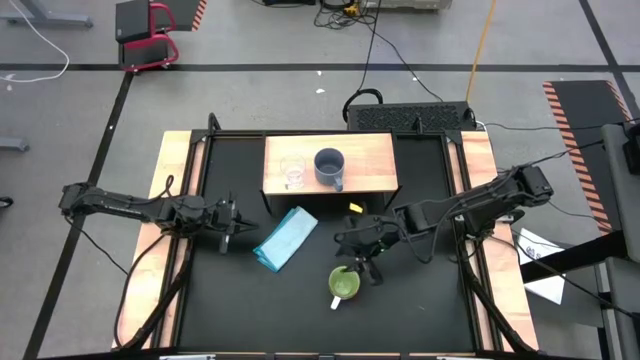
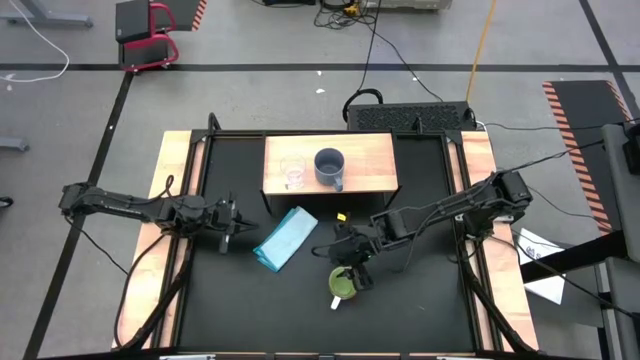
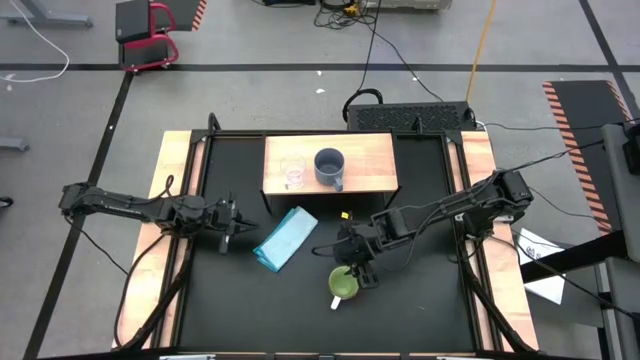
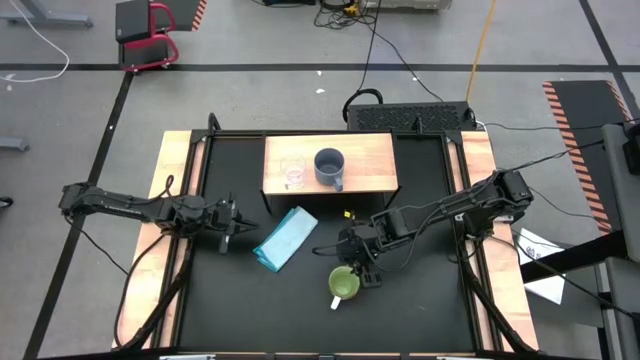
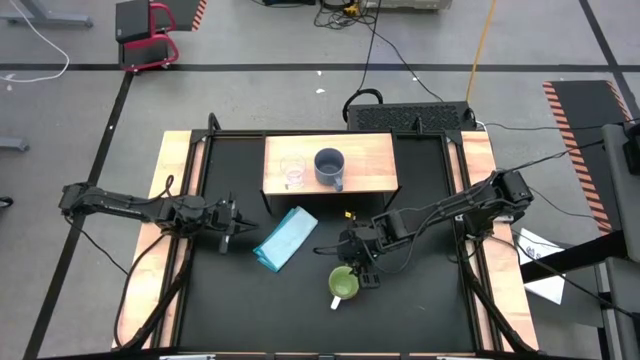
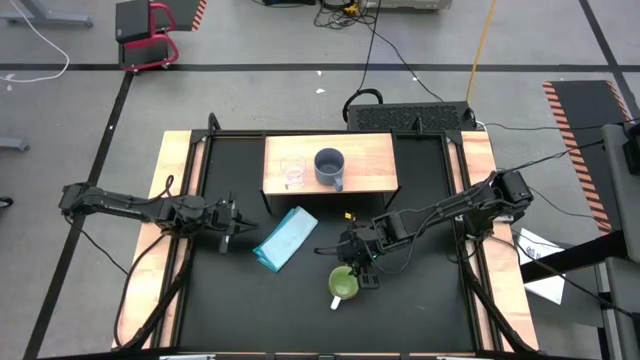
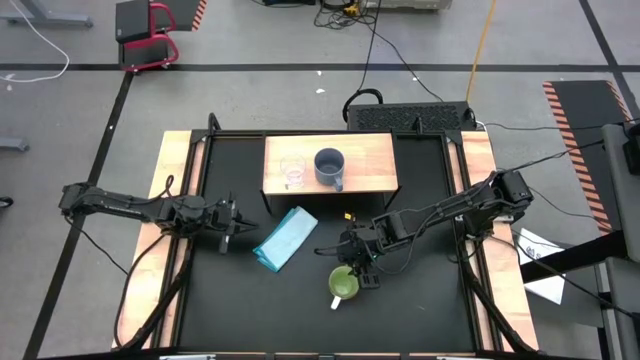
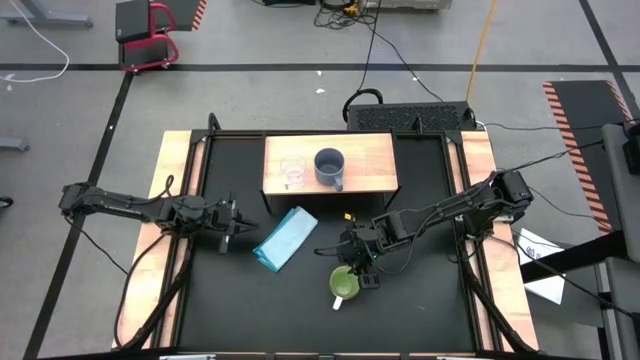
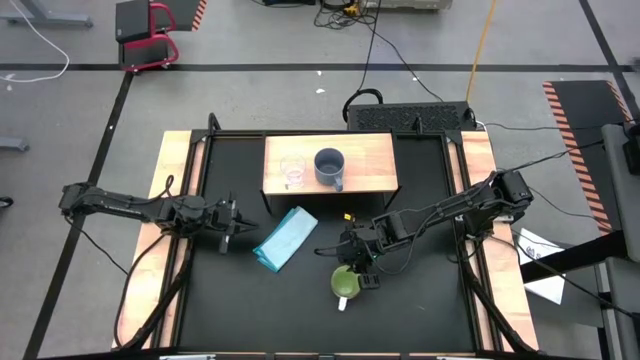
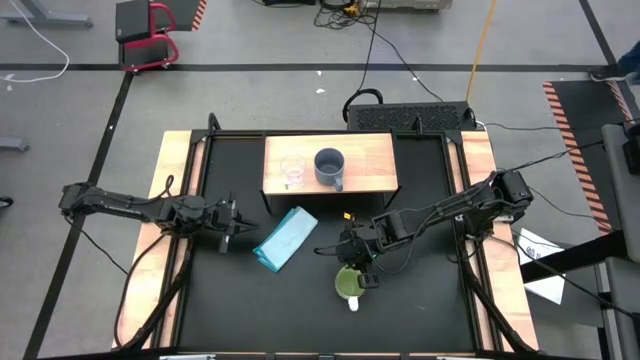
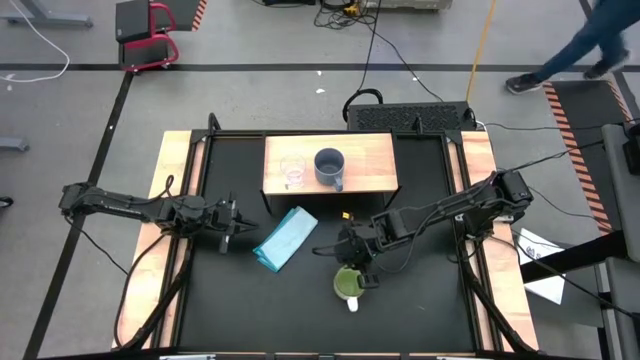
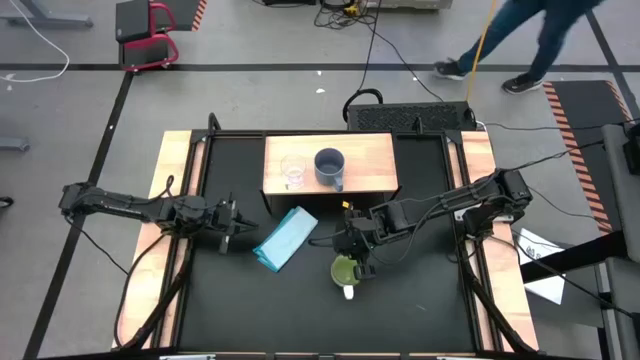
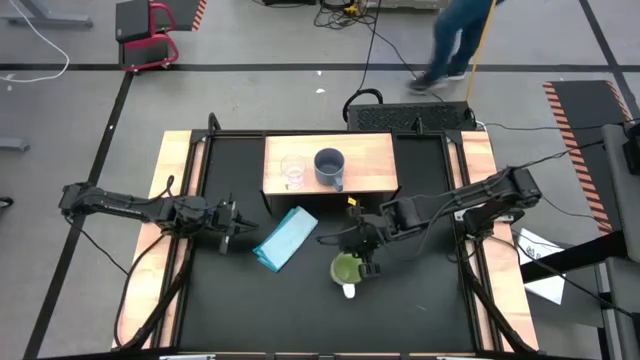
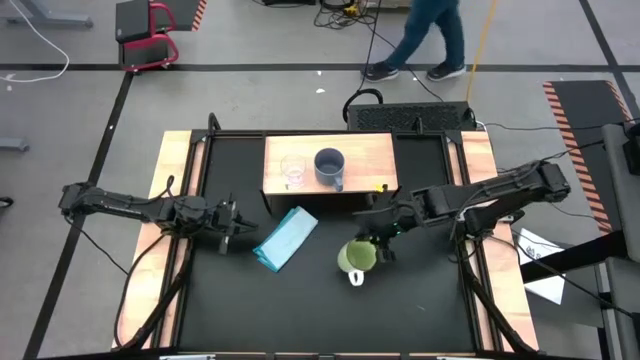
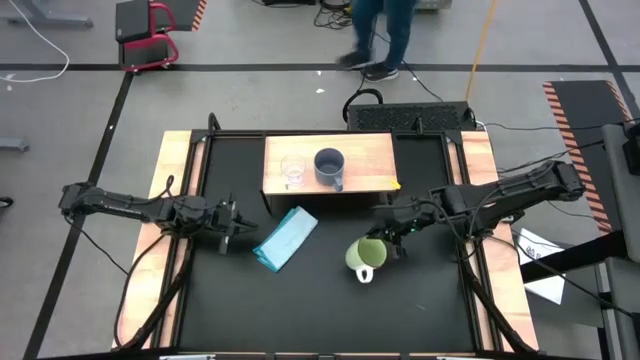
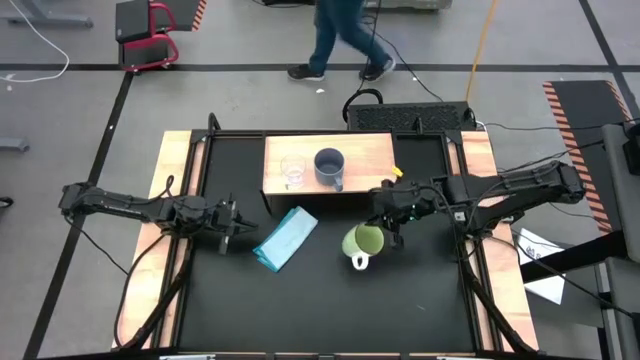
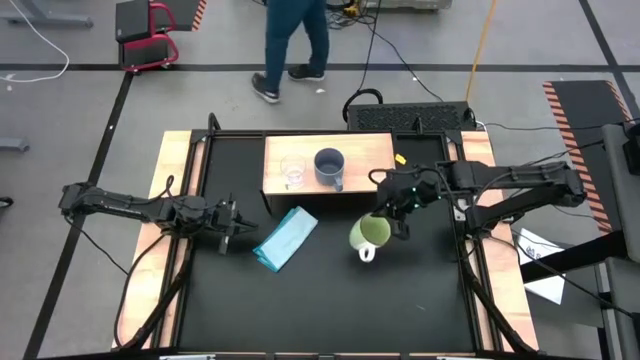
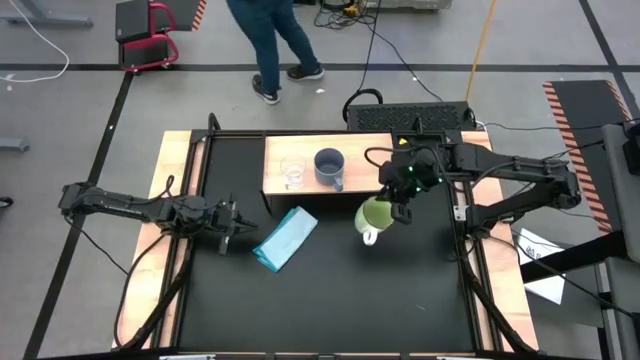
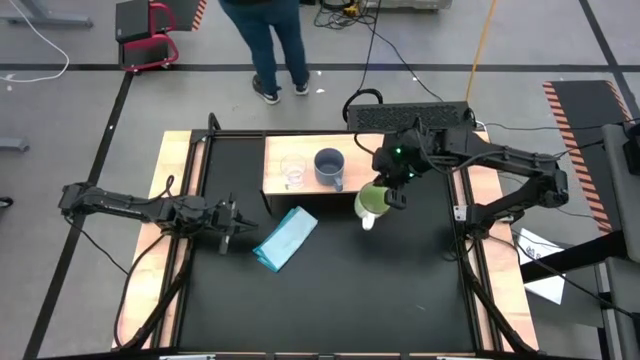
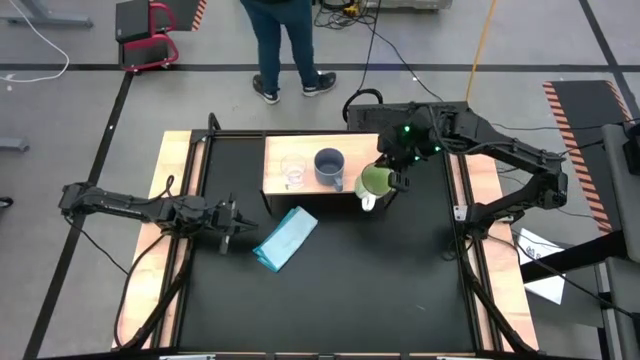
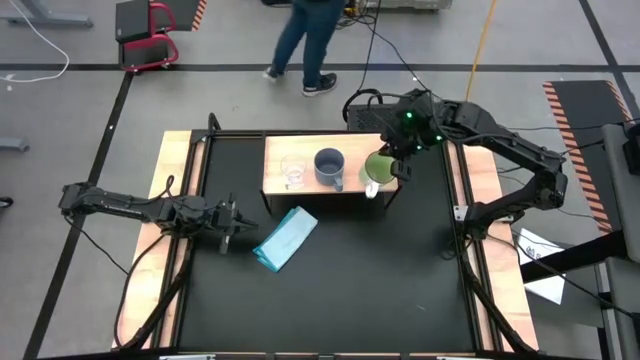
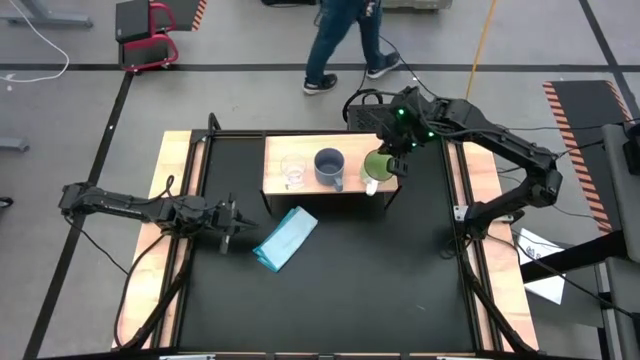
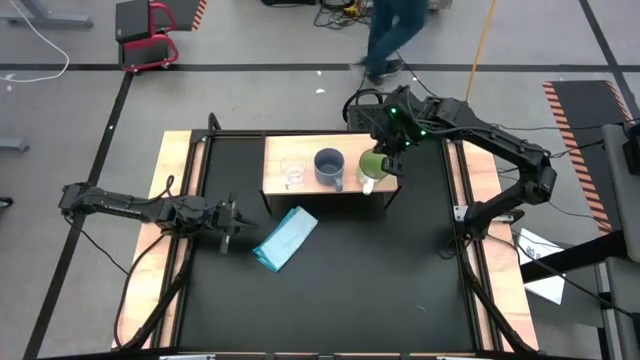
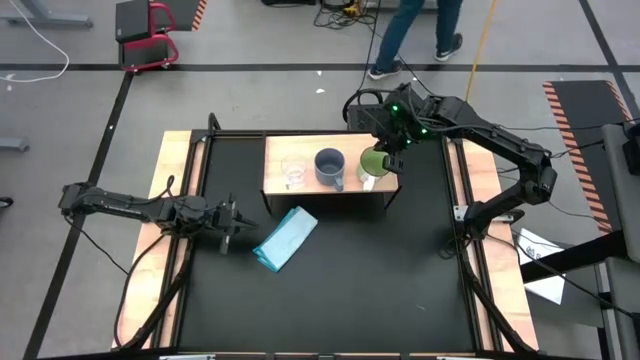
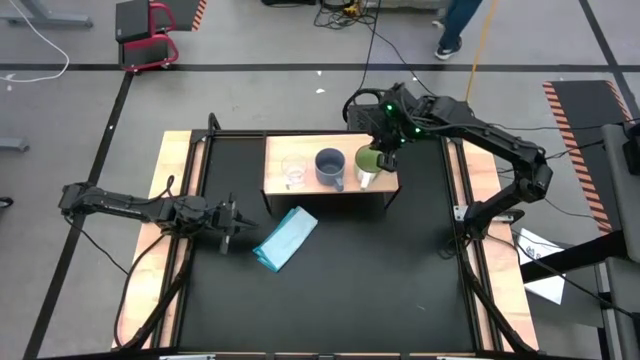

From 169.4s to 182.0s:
Task: Stack small to large cups/mugs on shelf
Put the green mug on the shelf

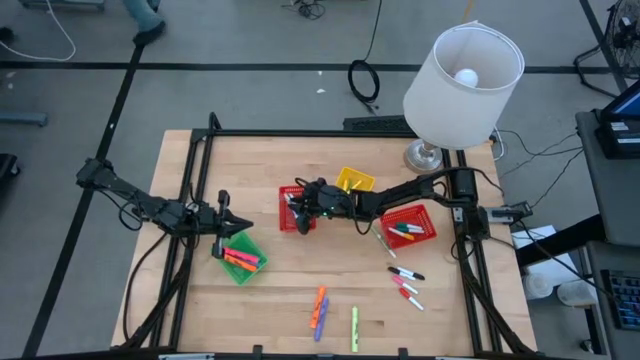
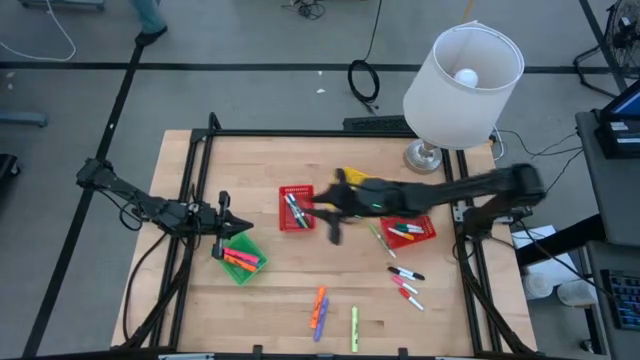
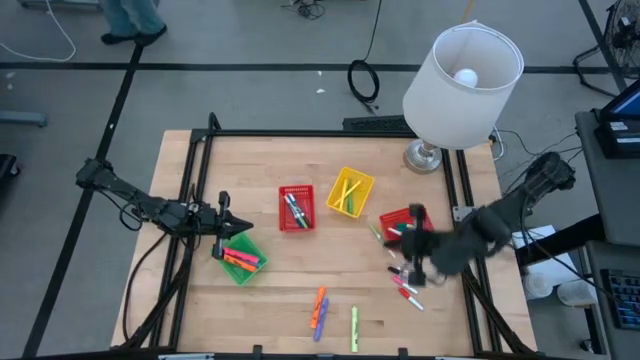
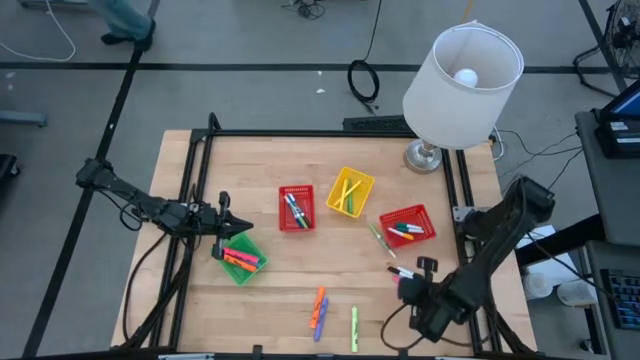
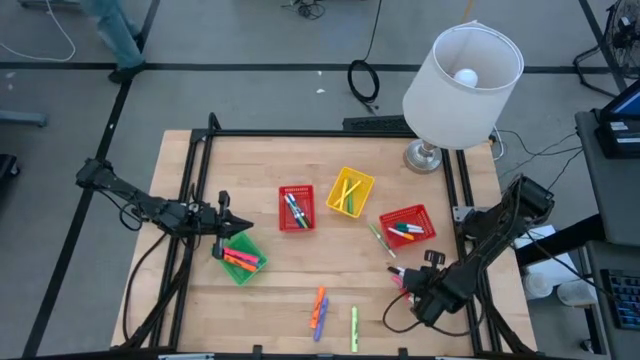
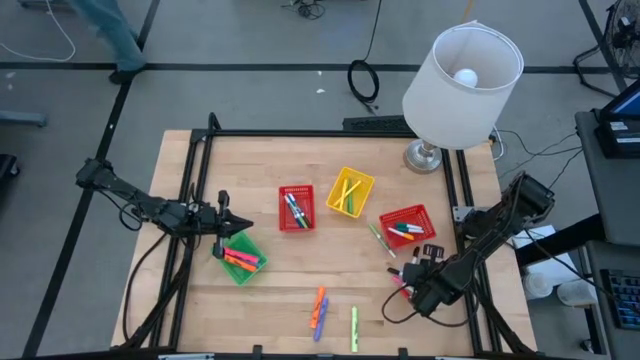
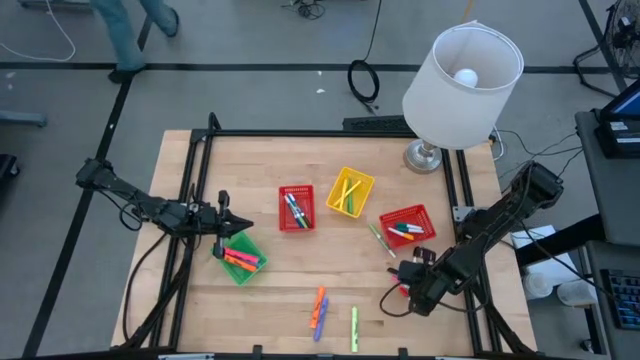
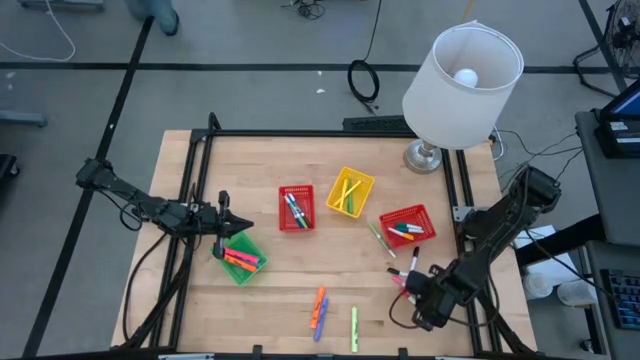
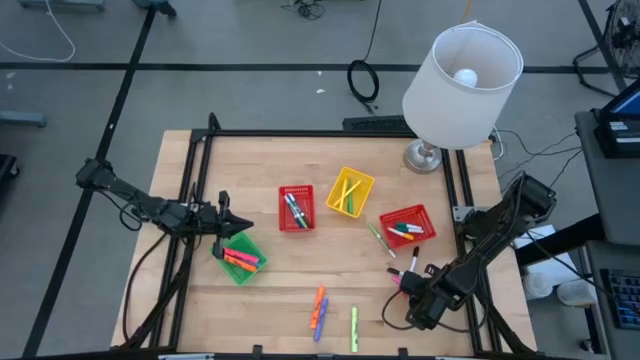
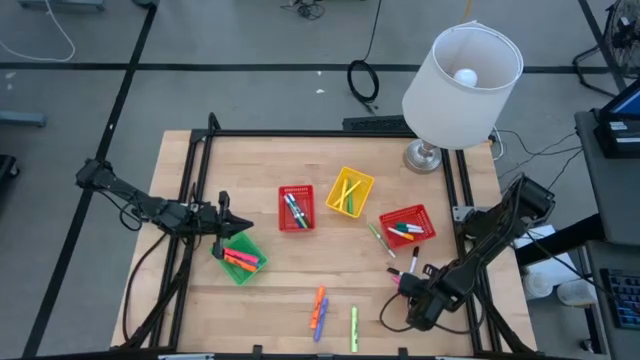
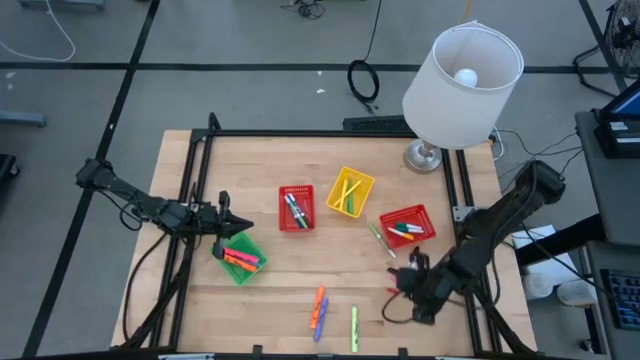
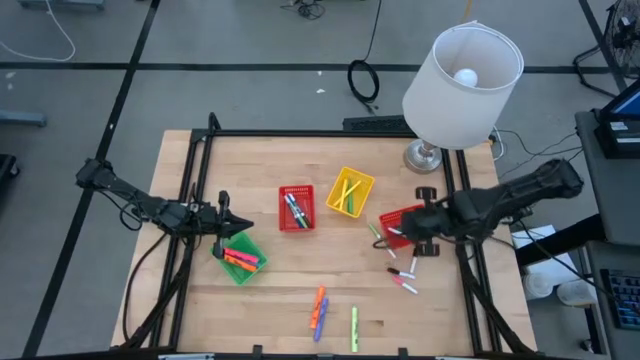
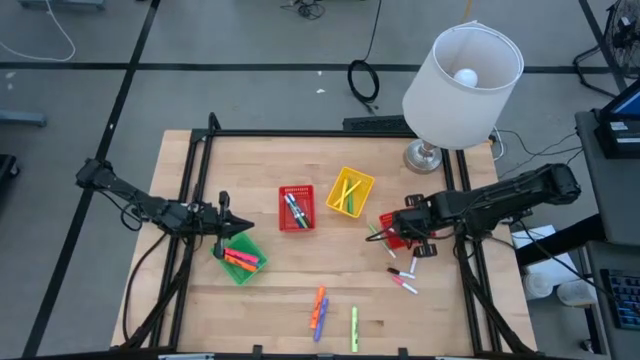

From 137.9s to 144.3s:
Task: Pick & Place Markers
Put the small red highlighter pen into the right red bin
